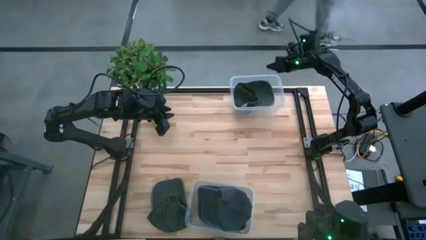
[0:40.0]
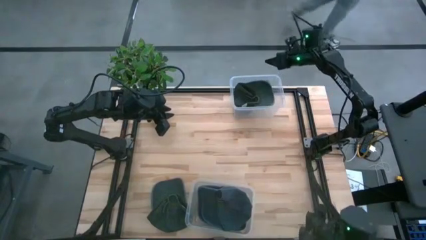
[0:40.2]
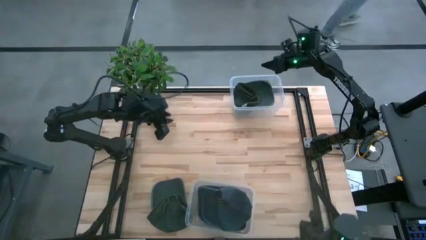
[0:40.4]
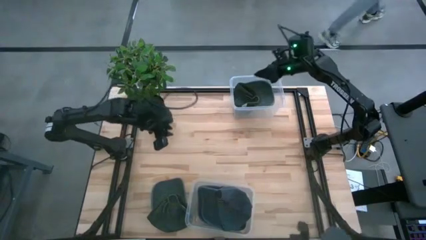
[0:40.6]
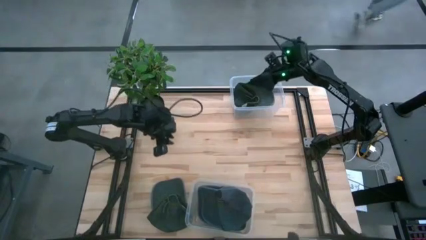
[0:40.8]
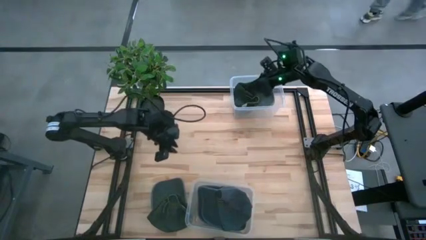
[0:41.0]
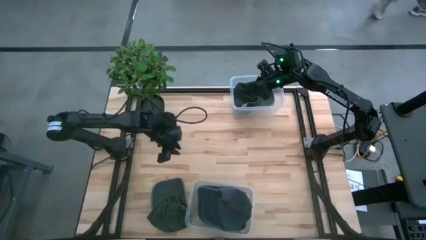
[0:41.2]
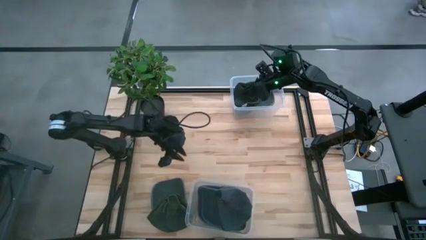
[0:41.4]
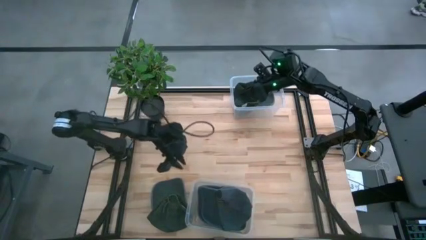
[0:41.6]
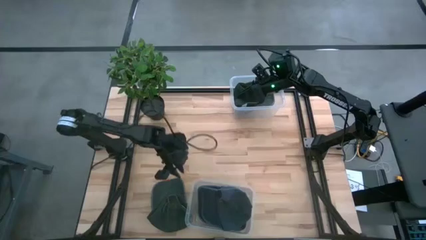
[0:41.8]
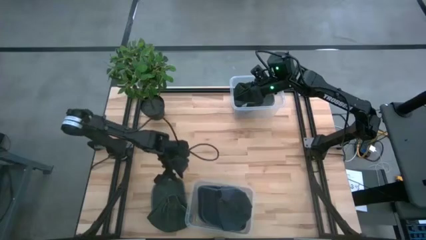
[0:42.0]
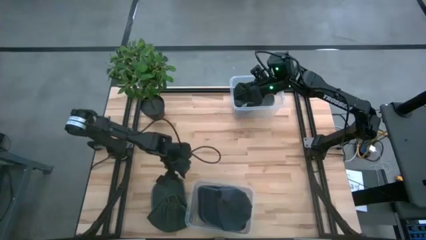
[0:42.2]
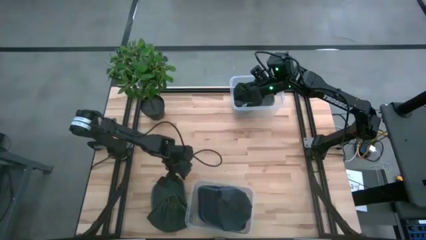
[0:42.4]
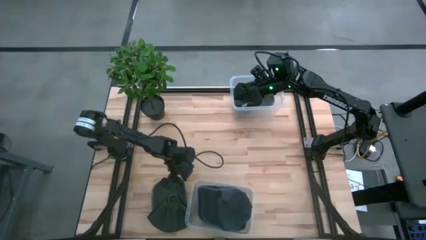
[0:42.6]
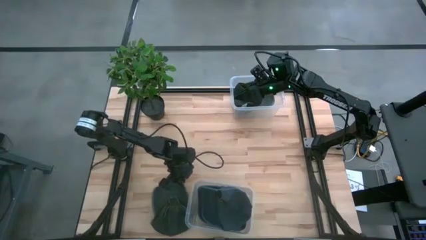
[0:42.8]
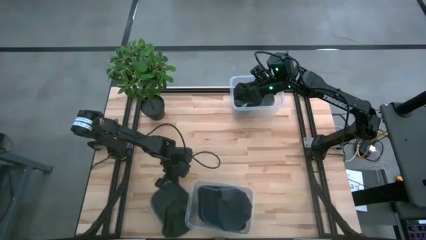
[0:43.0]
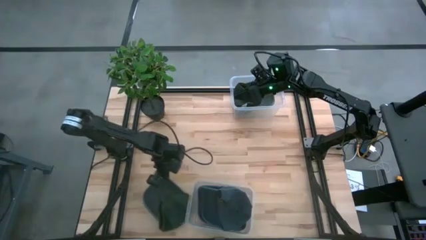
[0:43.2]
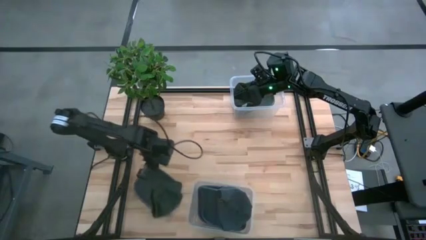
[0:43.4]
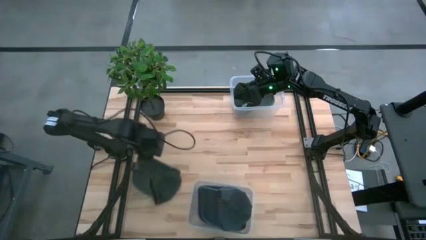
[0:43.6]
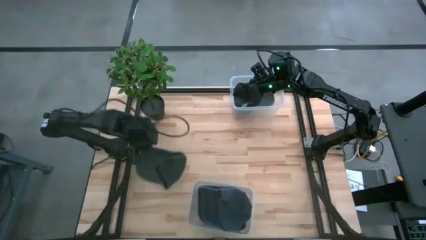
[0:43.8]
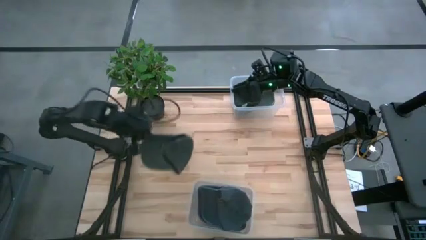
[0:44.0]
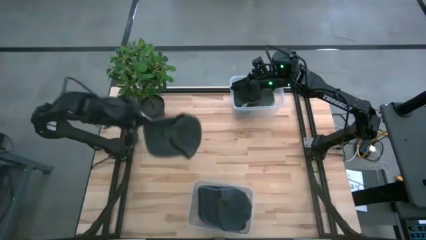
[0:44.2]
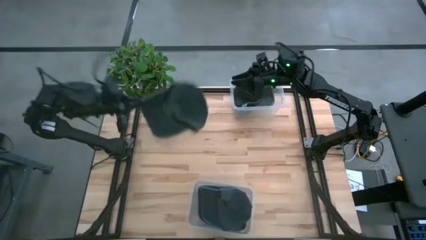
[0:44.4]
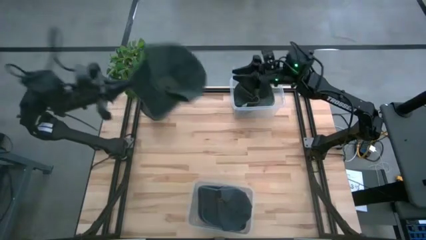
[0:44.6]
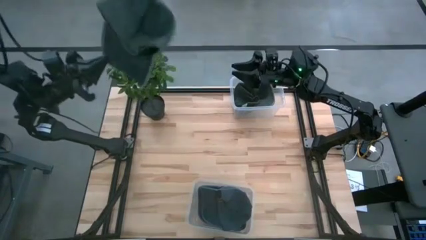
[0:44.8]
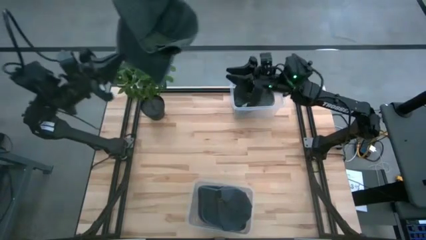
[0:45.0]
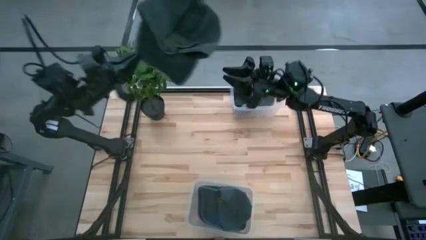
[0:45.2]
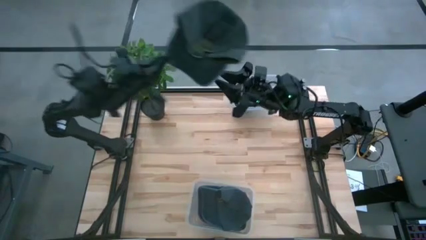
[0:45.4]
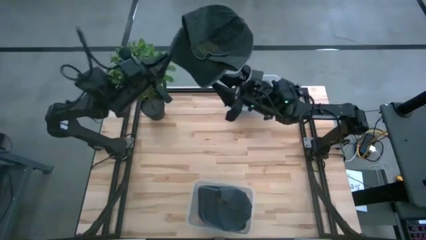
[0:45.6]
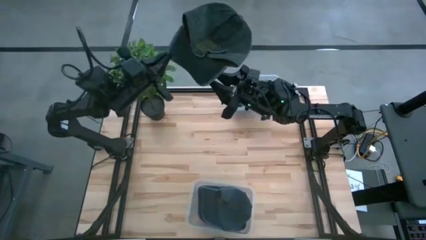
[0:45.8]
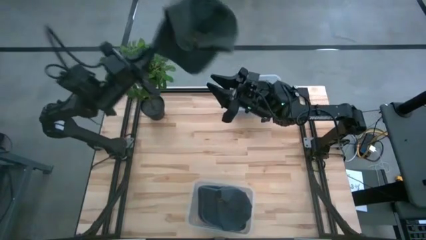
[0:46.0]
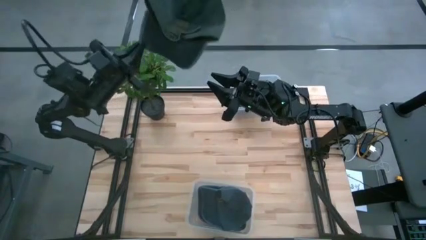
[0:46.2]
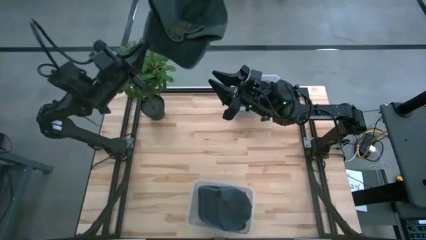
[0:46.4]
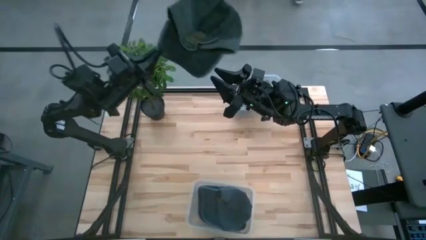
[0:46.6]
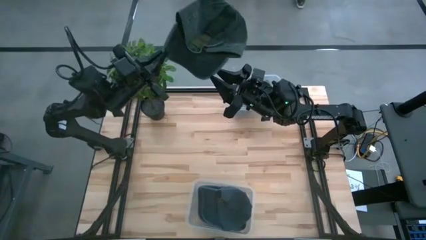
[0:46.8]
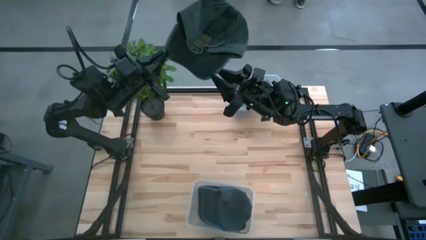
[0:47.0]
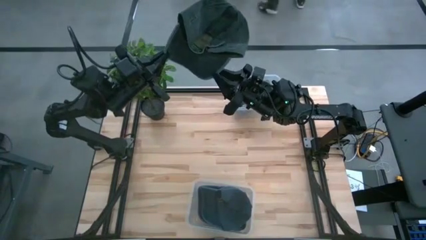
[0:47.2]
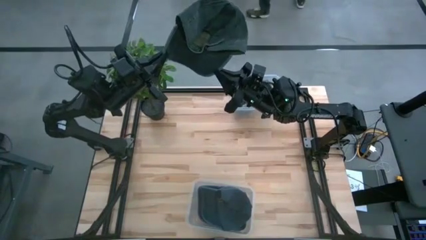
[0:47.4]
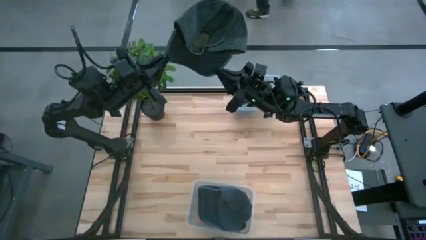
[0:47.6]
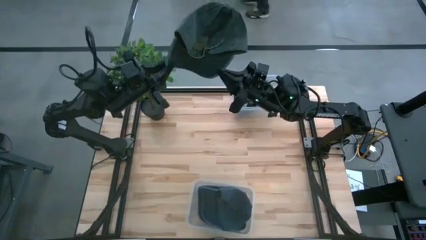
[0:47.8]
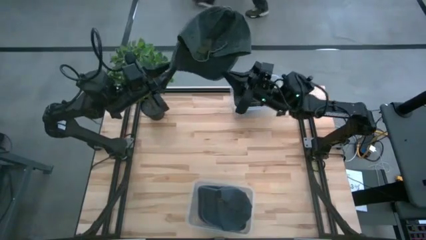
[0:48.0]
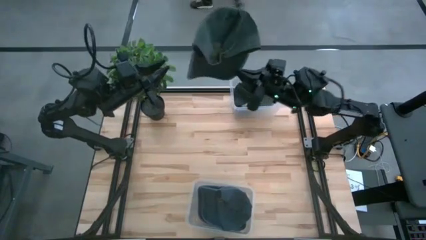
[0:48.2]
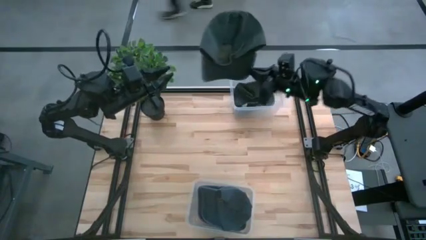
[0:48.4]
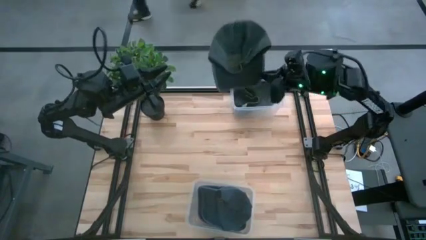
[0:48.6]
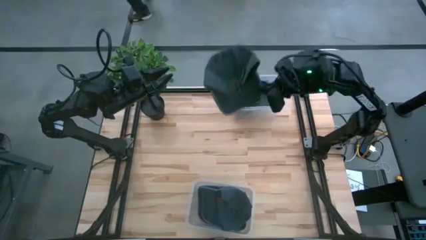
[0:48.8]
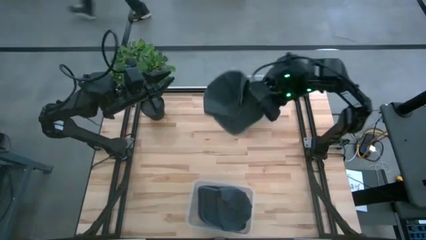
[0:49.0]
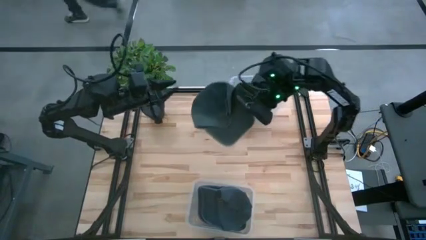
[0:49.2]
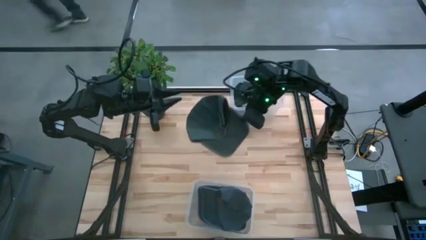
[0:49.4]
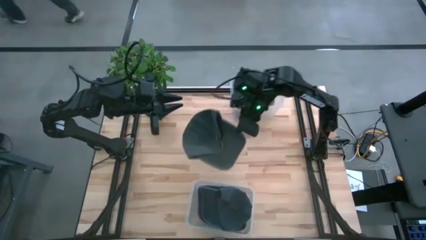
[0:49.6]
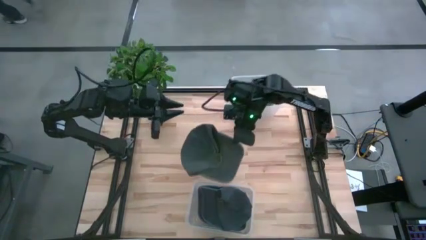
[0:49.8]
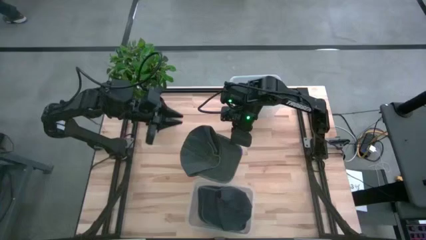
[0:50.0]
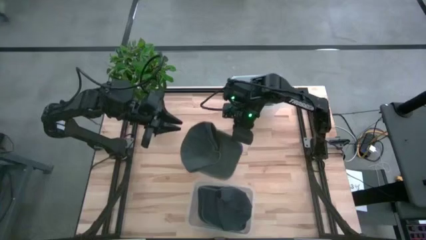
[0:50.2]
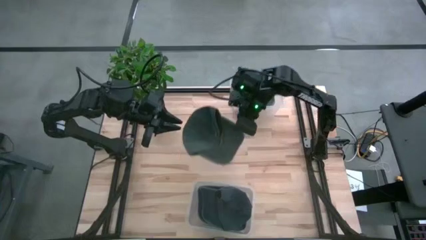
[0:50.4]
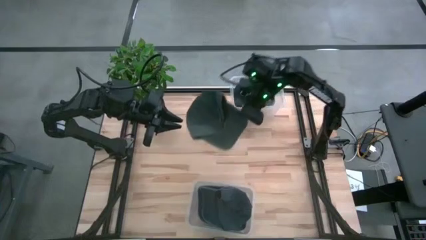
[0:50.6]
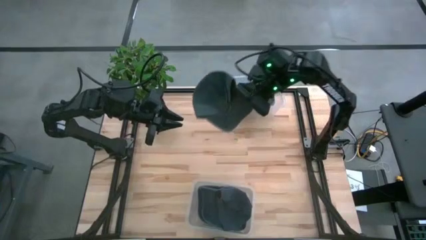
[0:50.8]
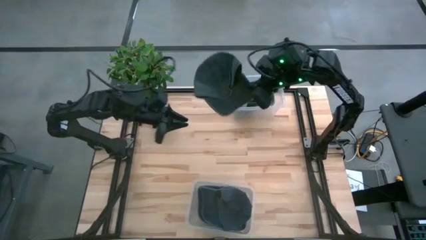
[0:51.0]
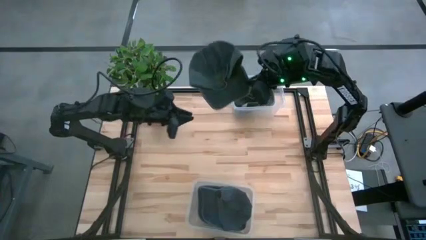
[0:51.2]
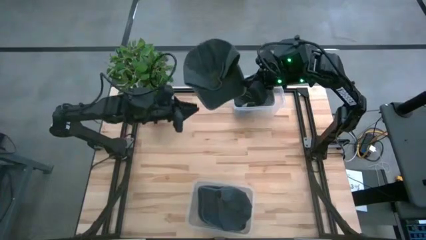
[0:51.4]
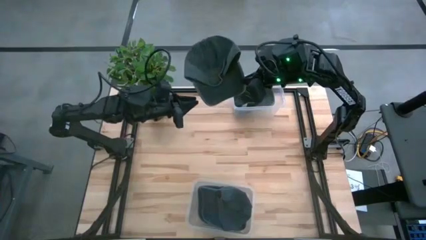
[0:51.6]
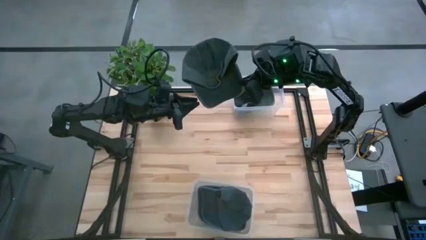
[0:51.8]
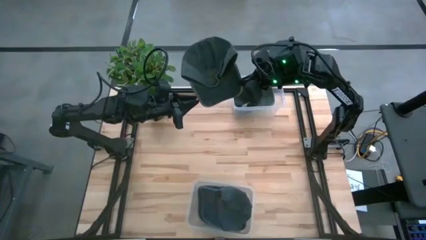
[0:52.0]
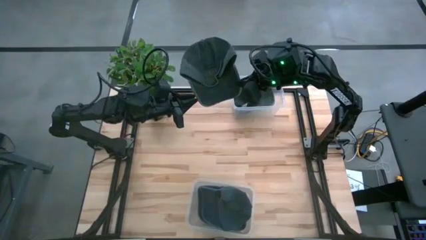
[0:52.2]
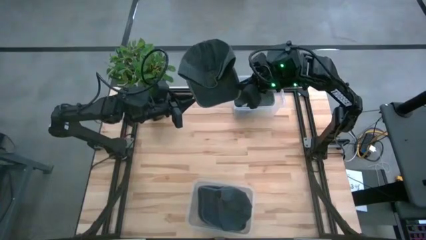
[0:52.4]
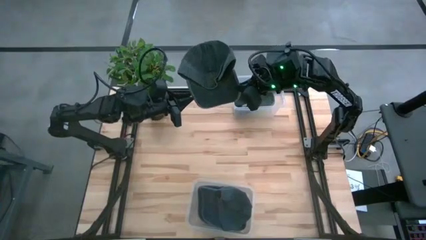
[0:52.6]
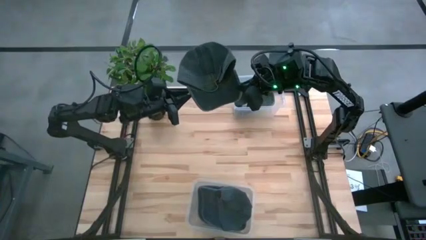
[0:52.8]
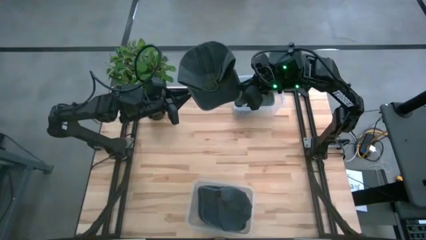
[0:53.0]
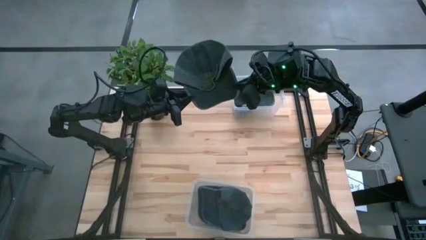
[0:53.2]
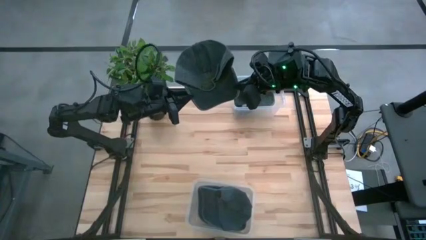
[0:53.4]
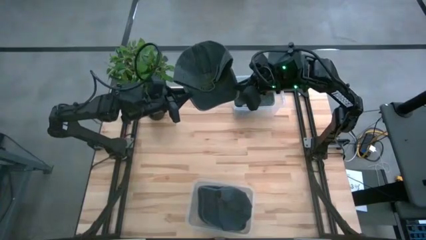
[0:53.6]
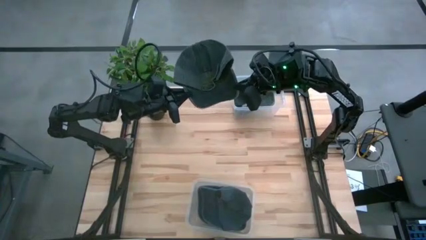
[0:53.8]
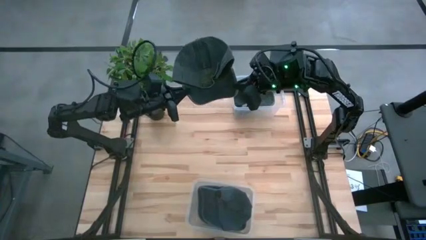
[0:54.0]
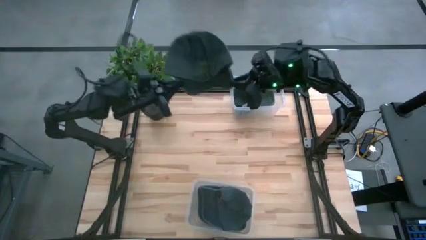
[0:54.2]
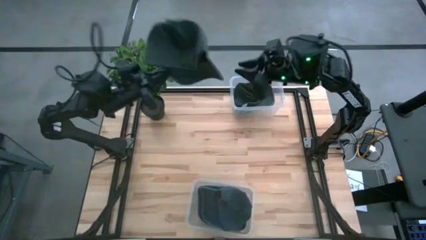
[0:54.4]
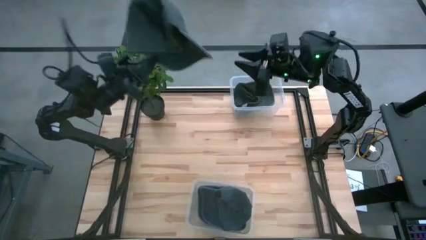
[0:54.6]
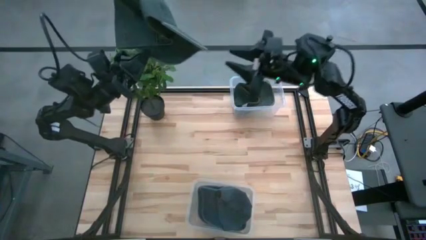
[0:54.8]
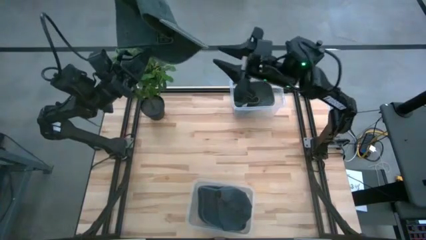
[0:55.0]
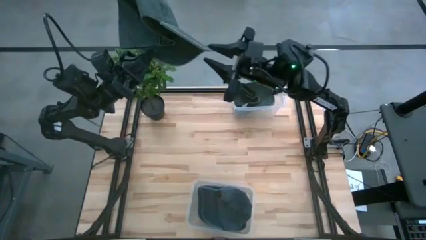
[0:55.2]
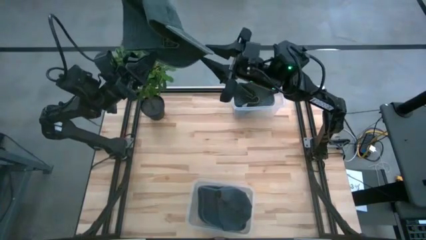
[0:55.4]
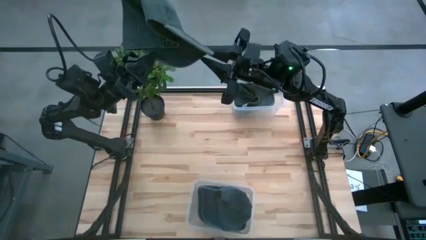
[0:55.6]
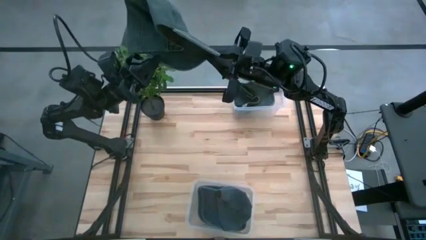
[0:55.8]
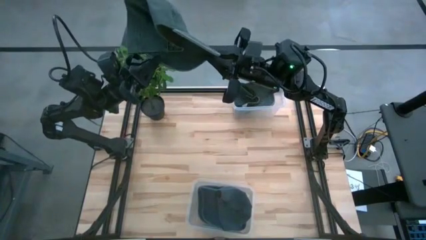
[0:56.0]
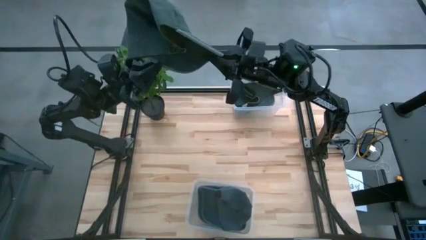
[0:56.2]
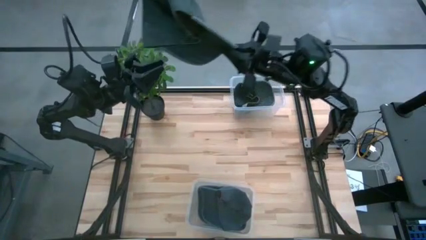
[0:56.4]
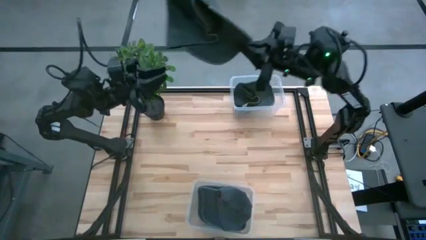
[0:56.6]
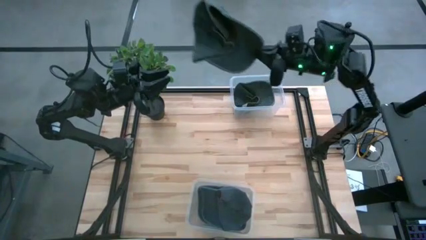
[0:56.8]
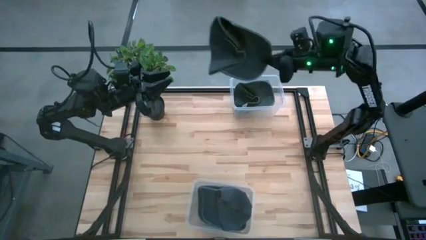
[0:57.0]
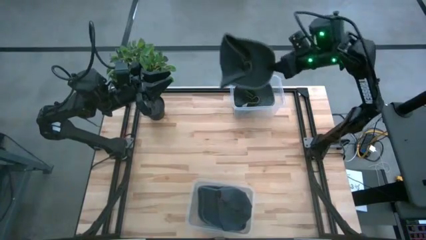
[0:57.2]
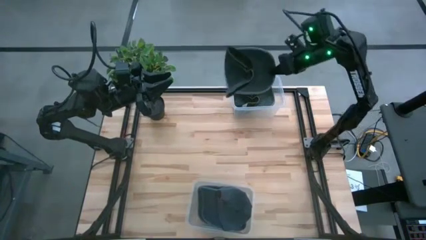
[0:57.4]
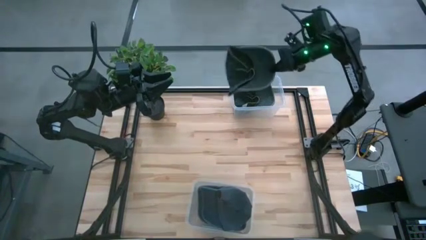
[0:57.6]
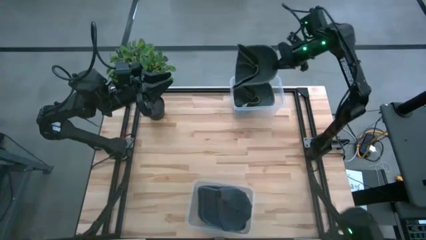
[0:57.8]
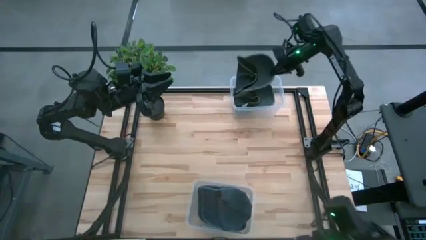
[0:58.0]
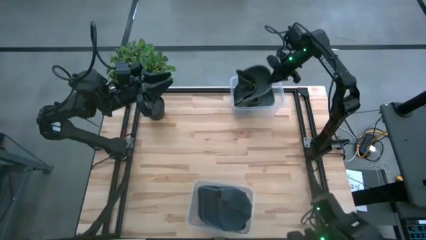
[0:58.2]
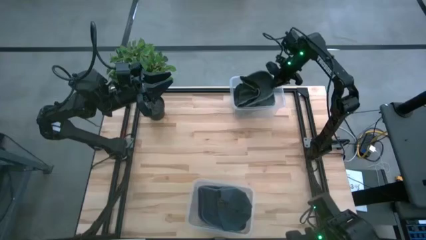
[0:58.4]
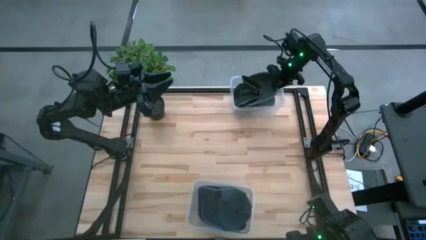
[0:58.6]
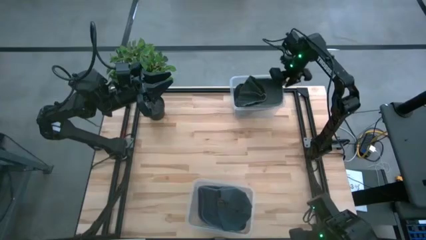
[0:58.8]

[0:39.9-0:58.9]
Task: Pick & Place hat
Put the black cap into the top transparent bin
